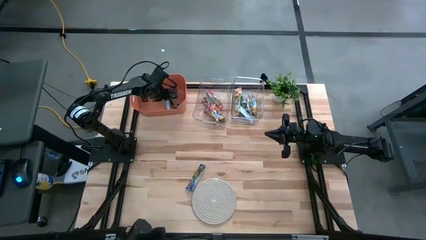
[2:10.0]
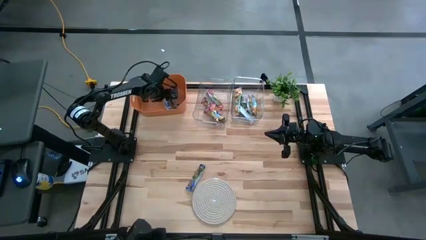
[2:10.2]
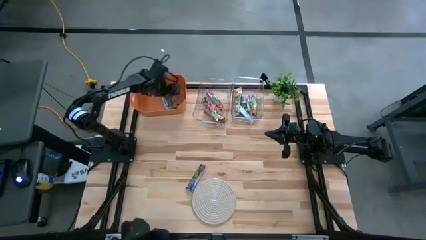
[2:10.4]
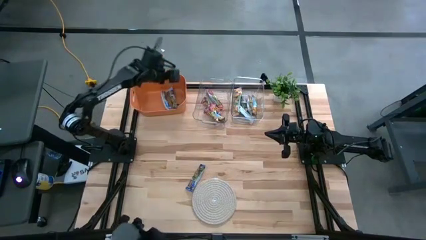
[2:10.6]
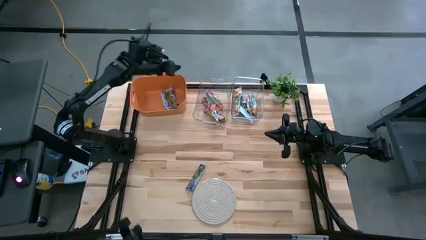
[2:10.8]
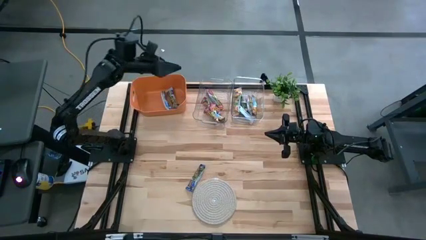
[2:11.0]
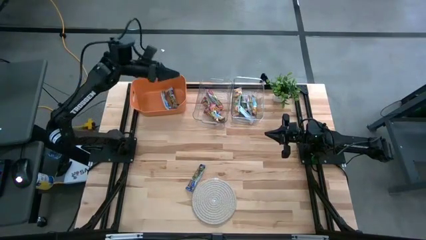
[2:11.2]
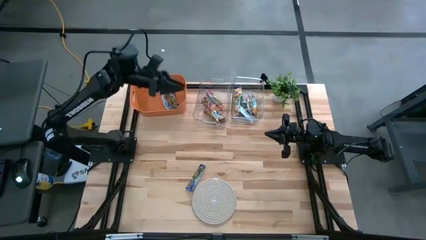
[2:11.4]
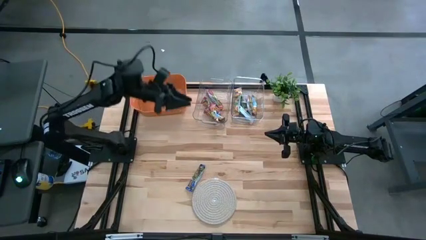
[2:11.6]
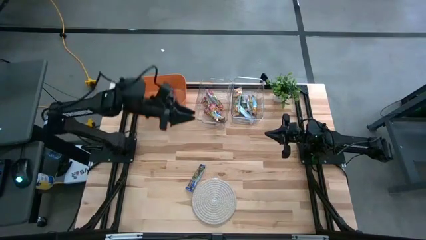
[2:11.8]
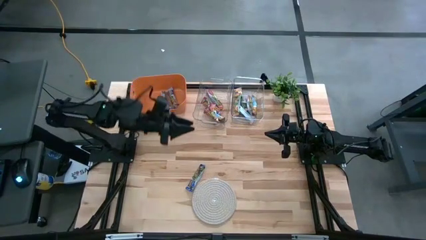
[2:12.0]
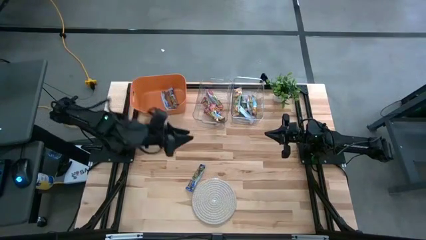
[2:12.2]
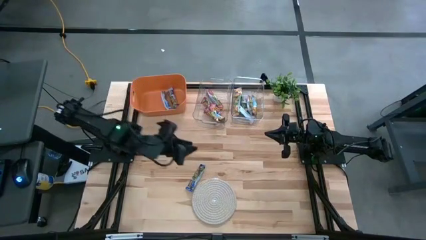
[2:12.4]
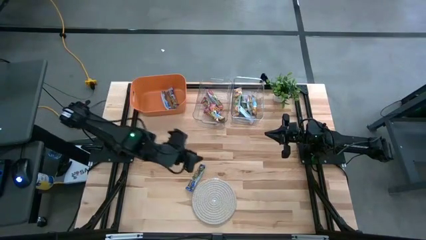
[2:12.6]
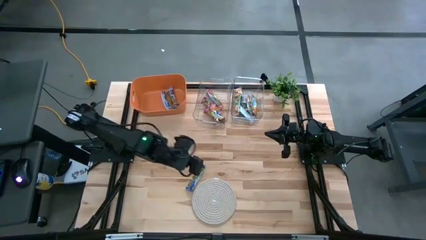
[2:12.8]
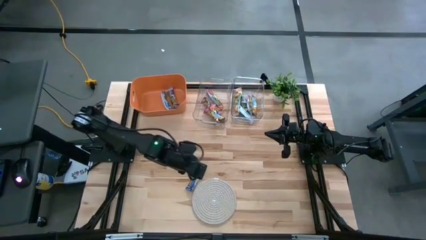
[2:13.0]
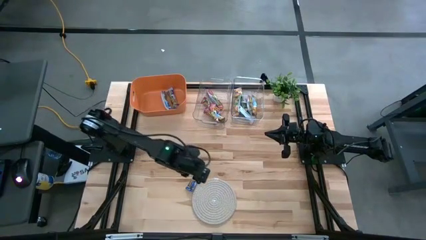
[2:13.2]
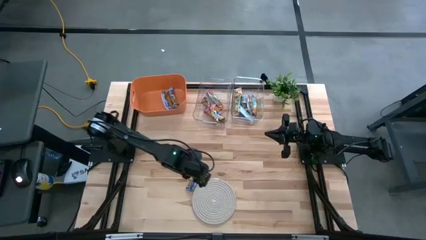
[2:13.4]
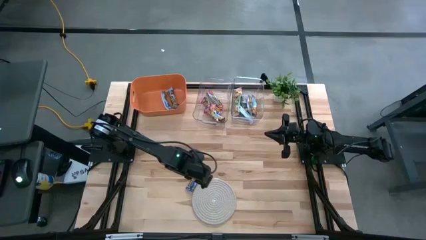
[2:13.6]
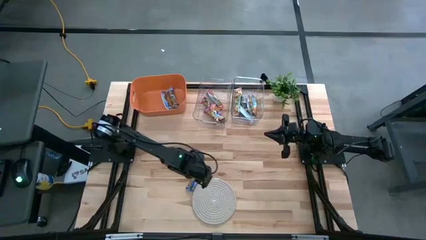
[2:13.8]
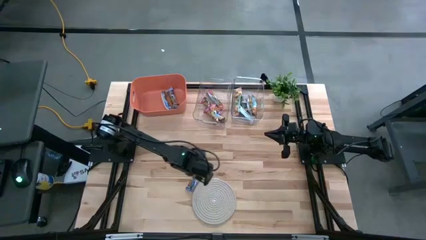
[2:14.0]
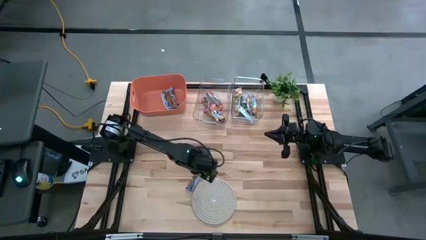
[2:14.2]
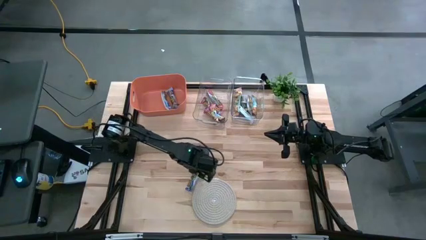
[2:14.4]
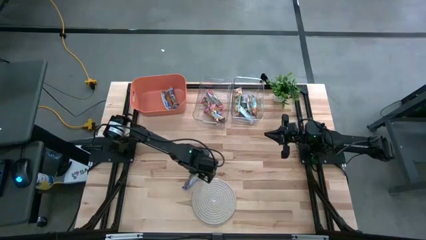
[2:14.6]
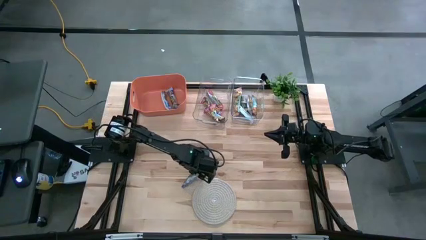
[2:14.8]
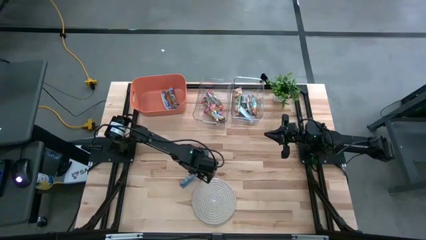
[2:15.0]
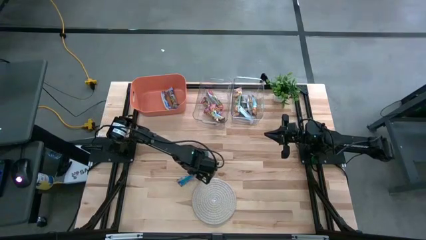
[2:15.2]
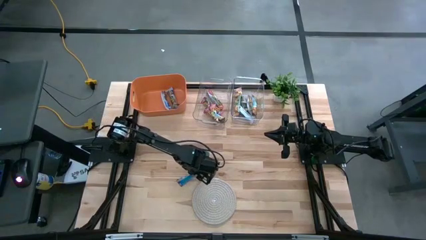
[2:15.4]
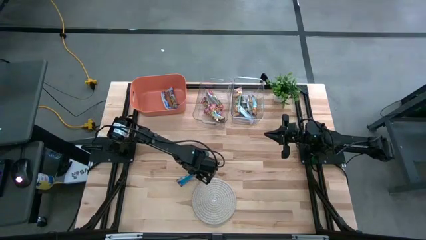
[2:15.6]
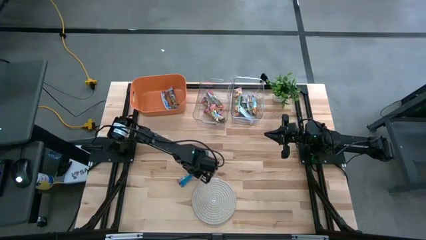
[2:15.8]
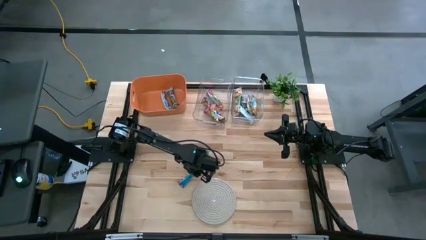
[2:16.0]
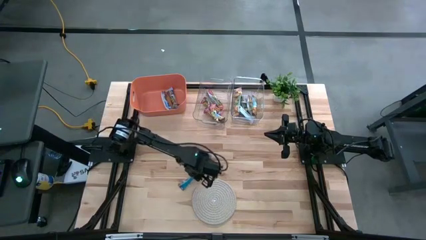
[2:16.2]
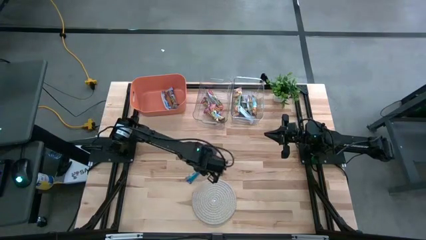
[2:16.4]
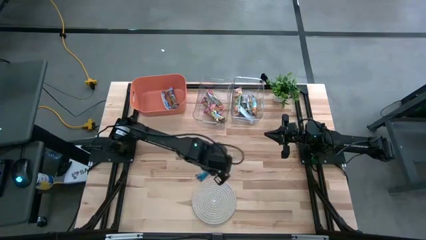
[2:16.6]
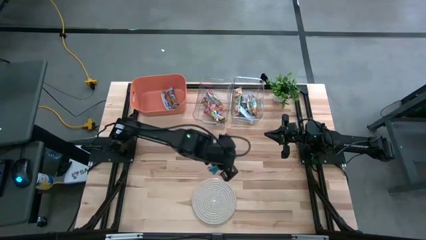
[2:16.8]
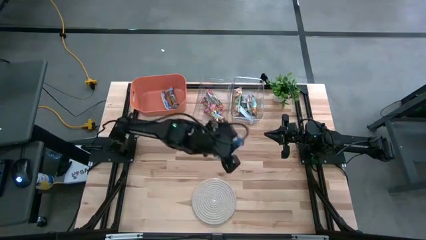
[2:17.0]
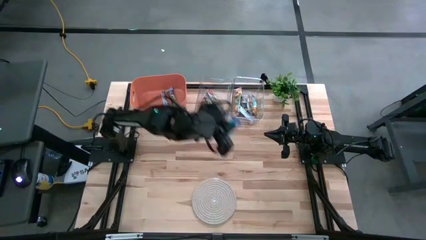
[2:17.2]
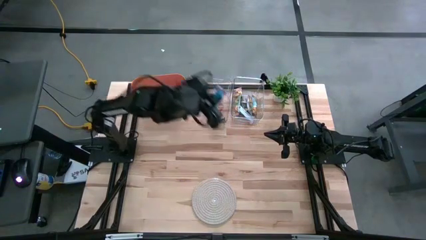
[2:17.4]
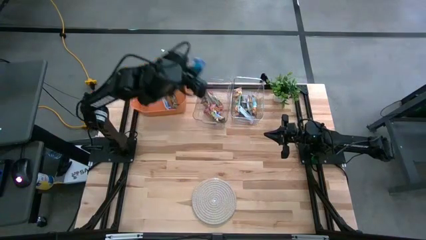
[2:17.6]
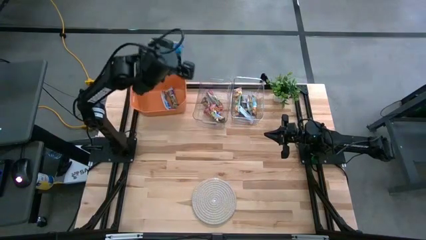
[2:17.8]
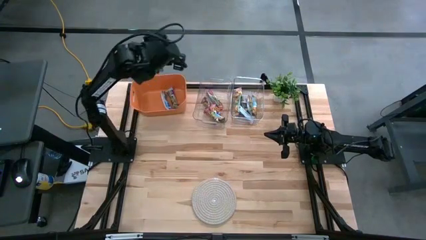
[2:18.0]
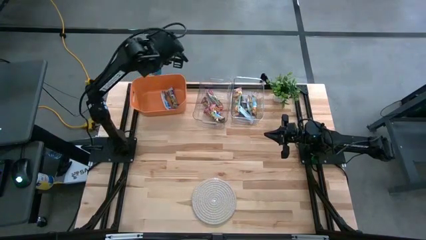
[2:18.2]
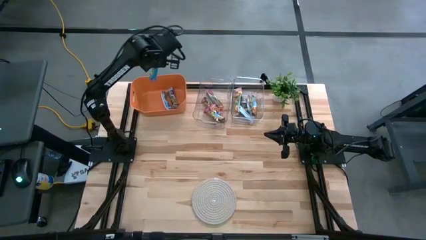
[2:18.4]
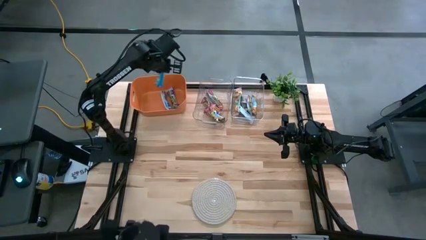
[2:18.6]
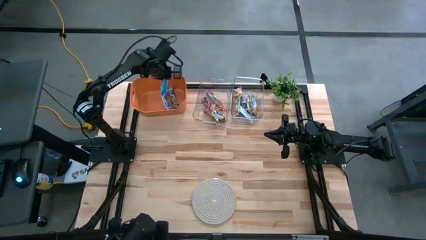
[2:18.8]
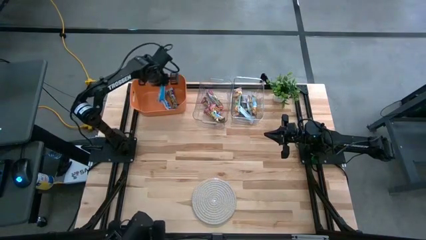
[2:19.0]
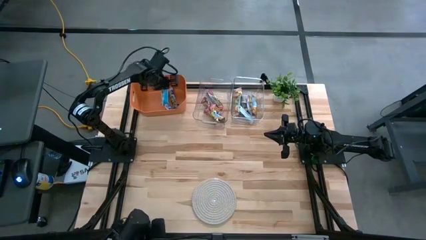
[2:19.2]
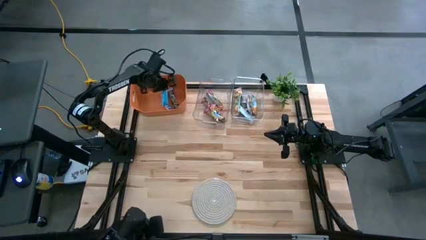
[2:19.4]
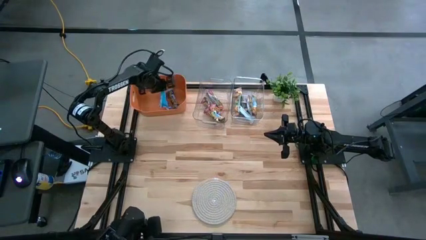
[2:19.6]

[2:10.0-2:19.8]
Task: Pick and place Granola Bars by type
Put the blue granola bar into the orange bin

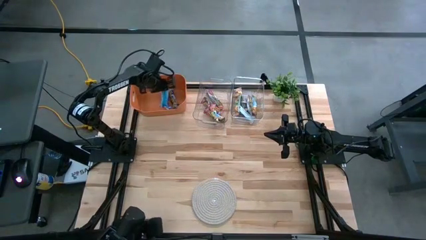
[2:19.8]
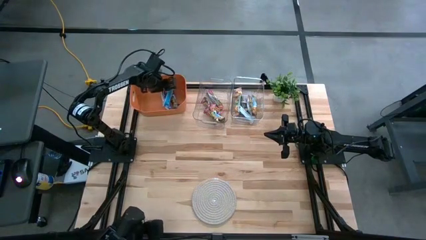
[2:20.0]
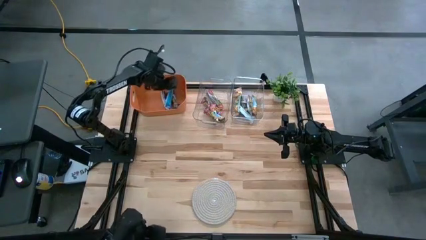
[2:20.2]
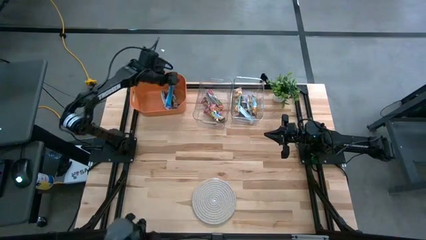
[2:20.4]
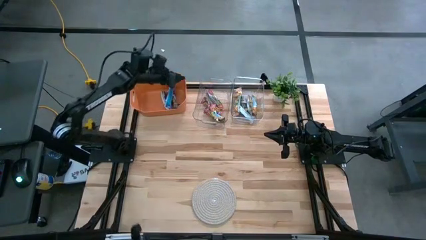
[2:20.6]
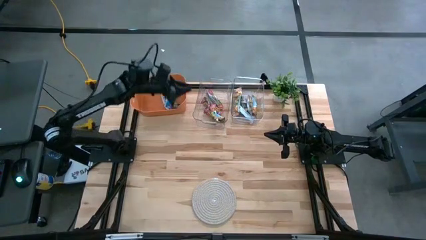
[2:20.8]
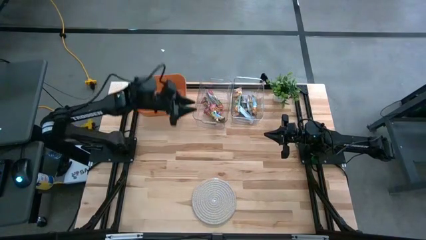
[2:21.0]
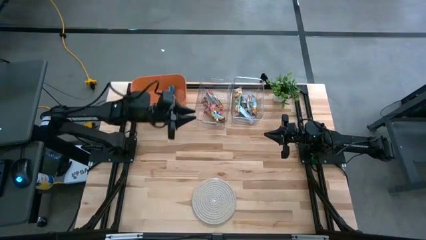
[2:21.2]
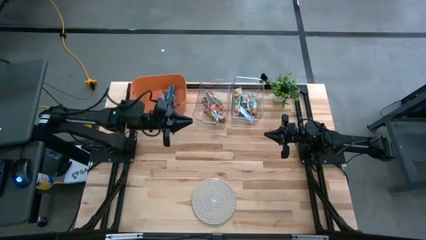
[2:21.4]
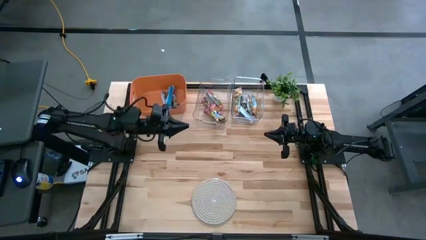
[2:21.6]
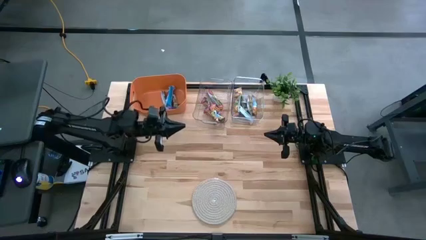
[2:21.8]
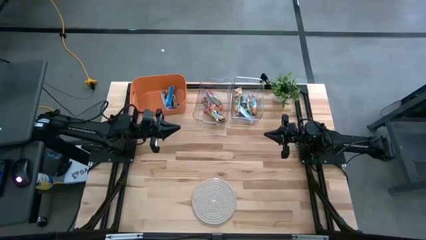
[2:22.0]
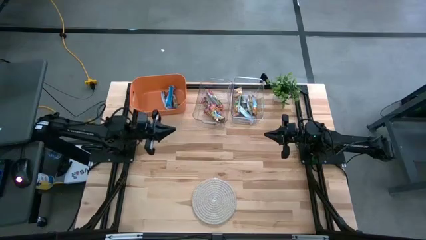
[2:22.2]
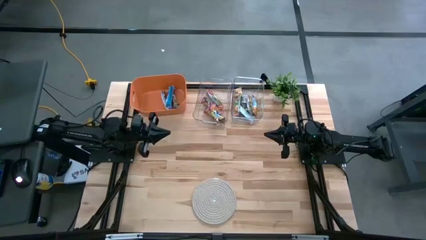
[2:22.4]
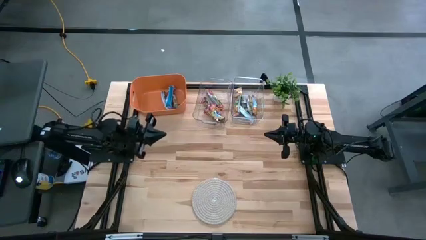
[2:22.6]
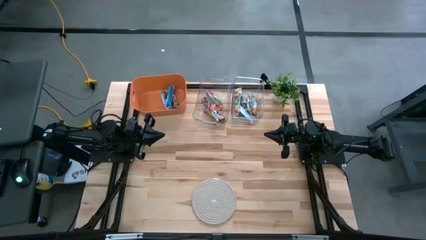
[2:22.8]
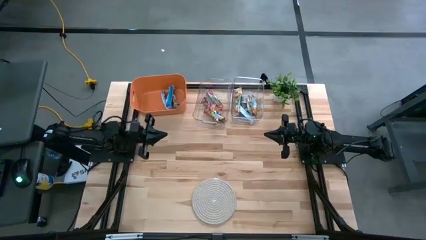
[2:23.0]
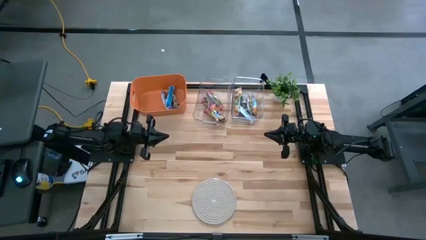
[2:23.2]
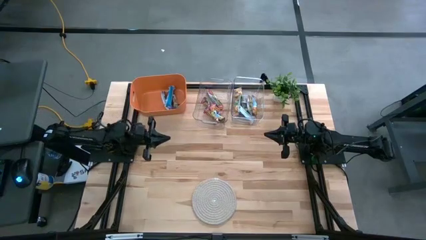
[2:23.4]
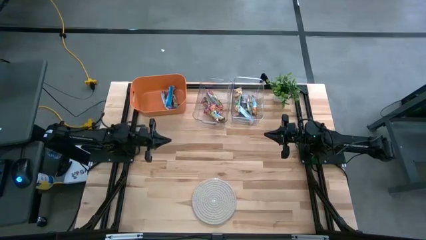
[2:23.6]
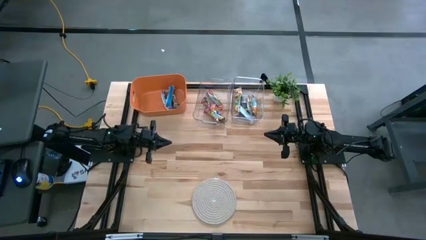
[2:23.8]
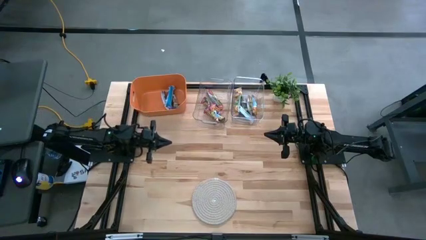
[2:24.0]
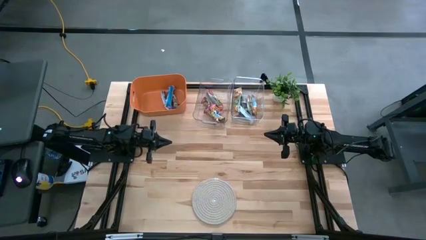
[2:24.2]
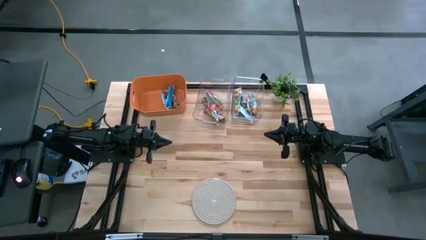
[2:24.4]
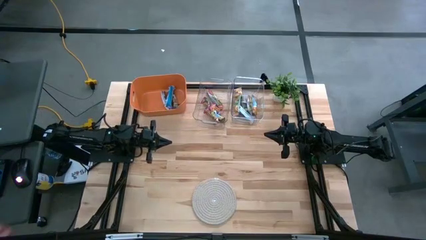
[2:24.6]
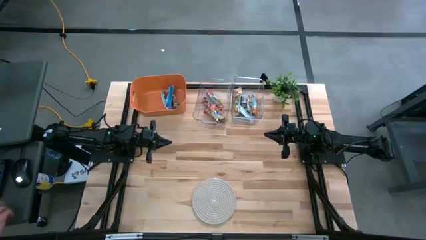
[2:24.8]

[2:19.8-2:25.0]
Return to Home Position
